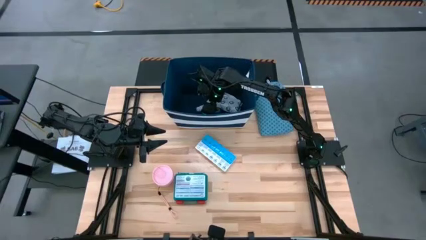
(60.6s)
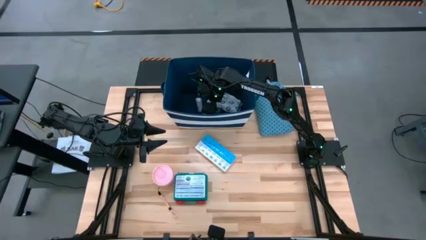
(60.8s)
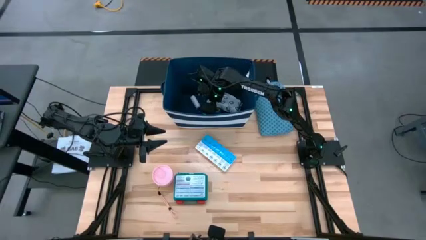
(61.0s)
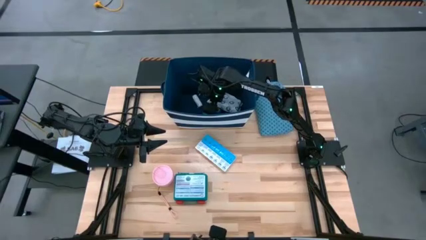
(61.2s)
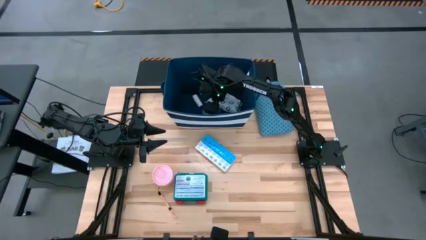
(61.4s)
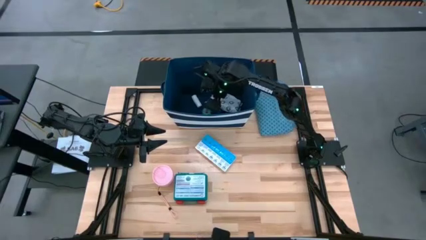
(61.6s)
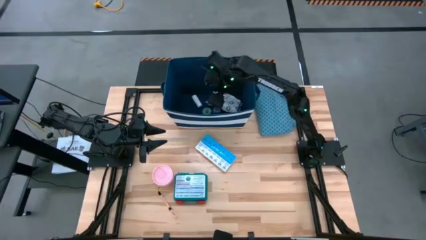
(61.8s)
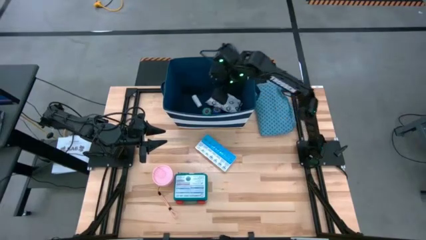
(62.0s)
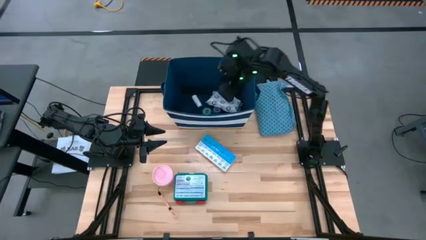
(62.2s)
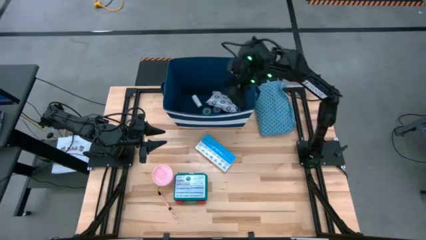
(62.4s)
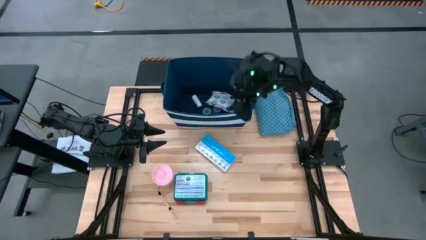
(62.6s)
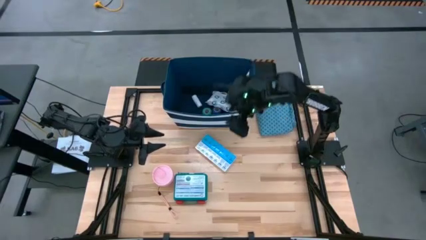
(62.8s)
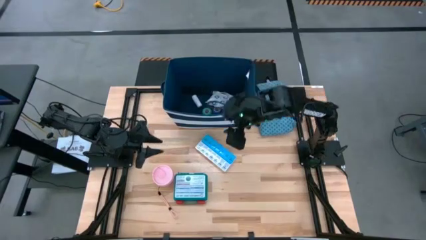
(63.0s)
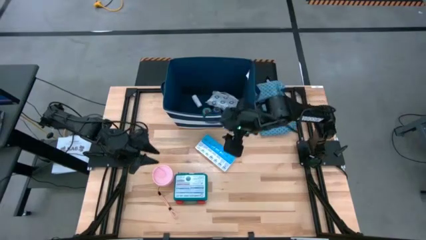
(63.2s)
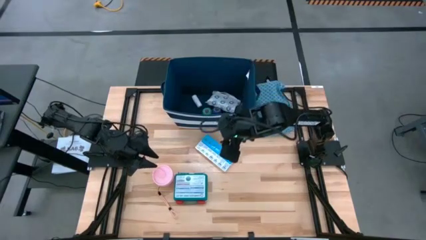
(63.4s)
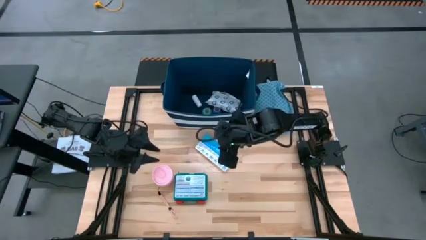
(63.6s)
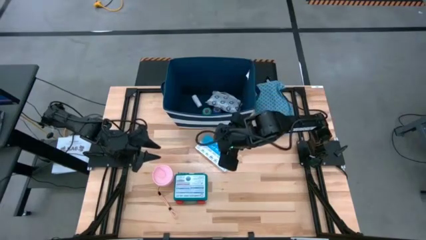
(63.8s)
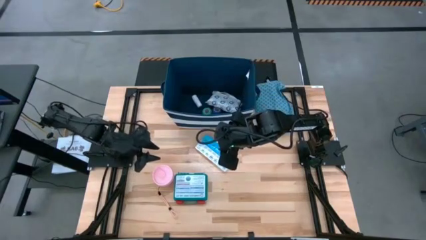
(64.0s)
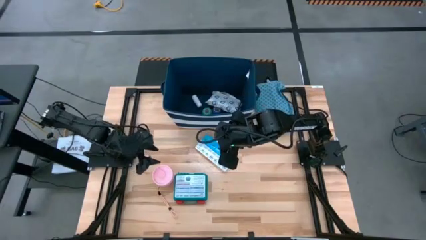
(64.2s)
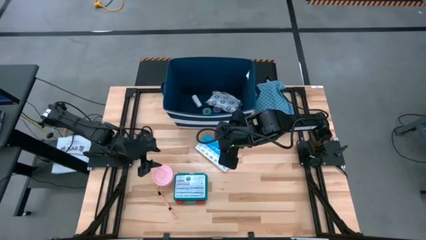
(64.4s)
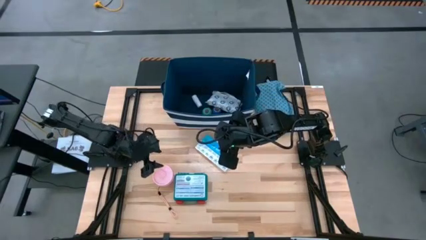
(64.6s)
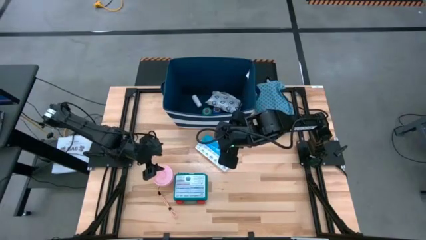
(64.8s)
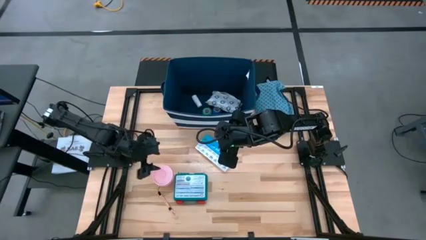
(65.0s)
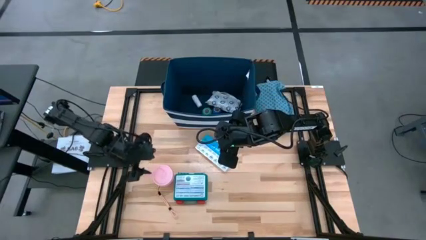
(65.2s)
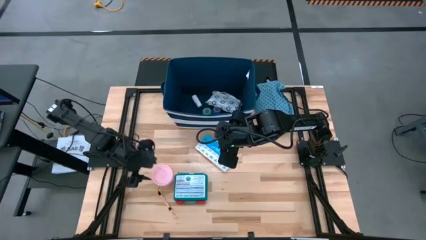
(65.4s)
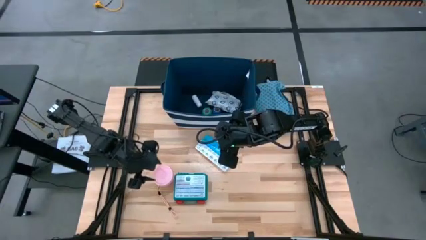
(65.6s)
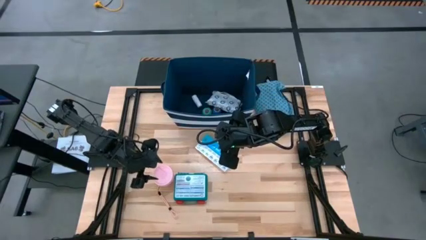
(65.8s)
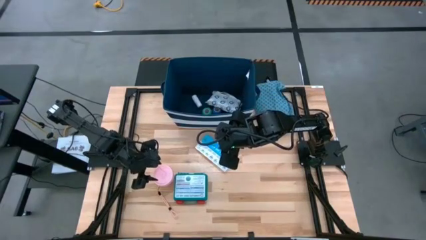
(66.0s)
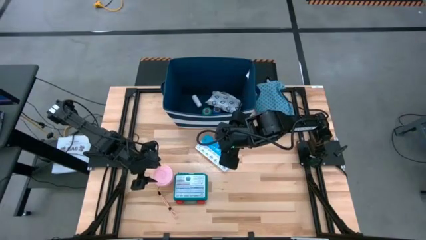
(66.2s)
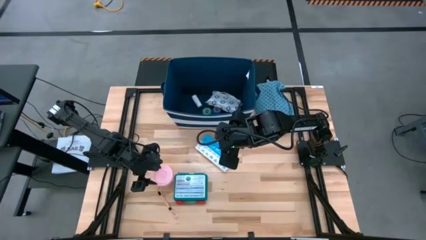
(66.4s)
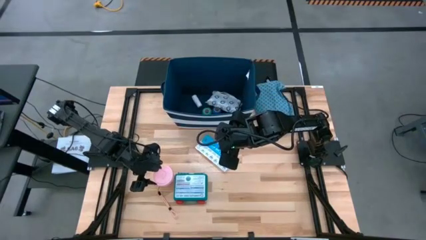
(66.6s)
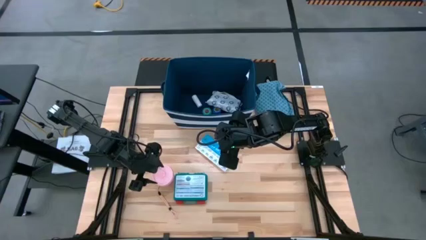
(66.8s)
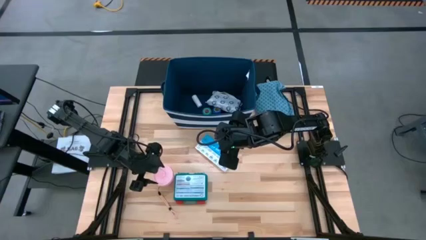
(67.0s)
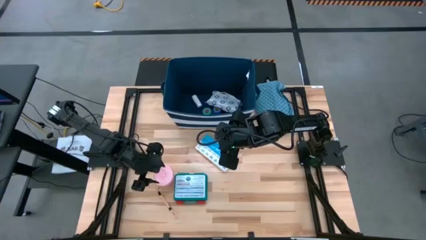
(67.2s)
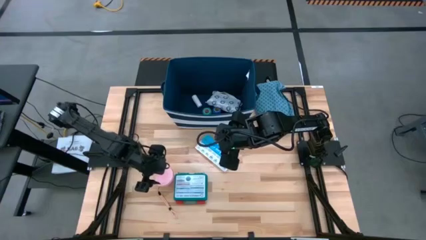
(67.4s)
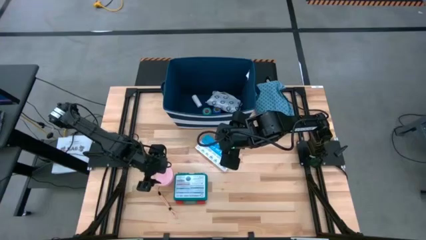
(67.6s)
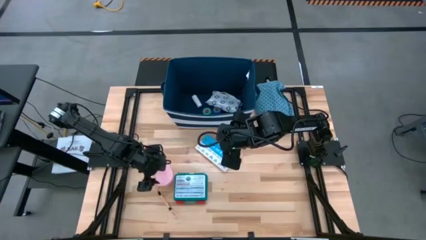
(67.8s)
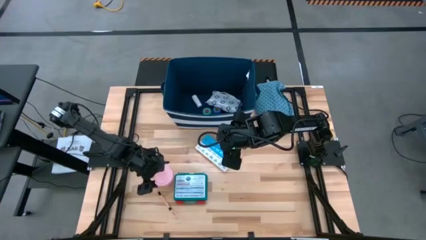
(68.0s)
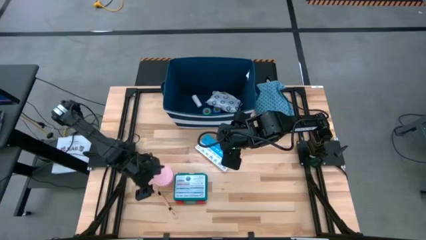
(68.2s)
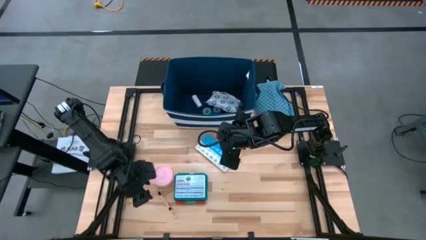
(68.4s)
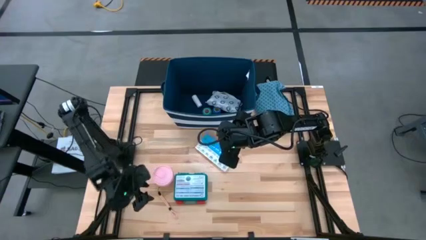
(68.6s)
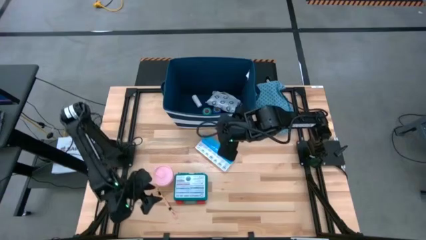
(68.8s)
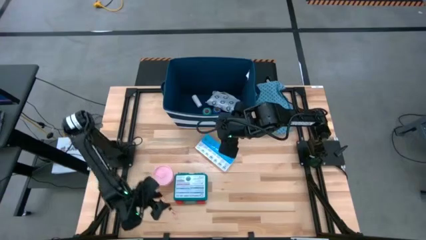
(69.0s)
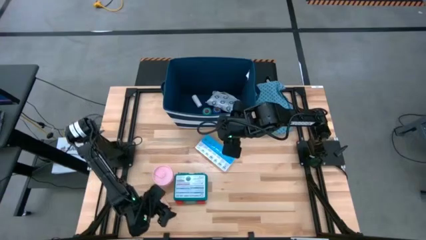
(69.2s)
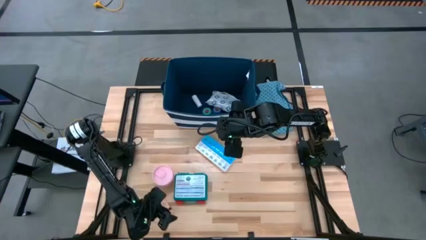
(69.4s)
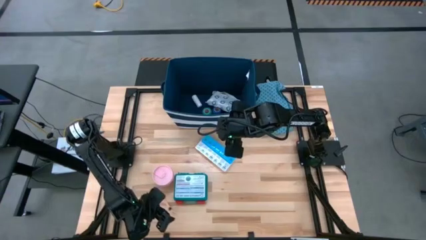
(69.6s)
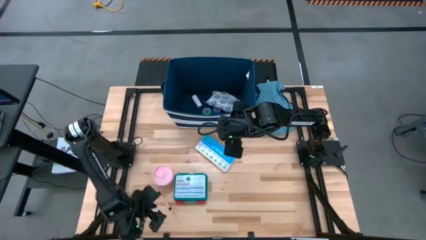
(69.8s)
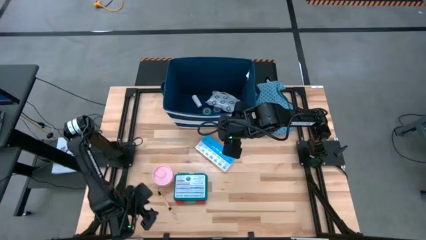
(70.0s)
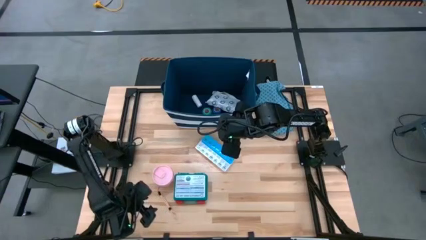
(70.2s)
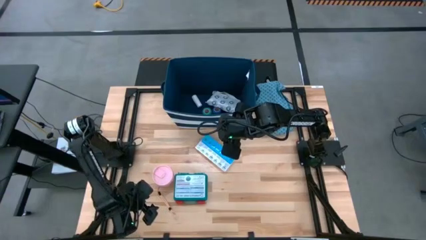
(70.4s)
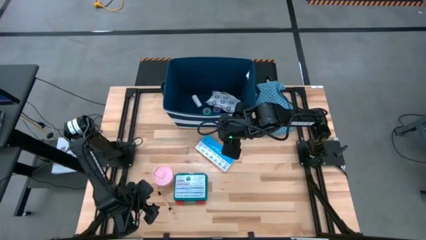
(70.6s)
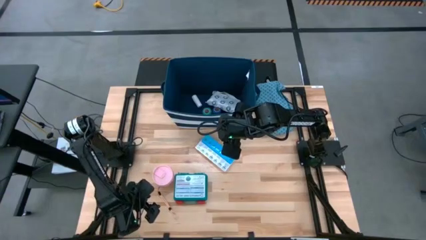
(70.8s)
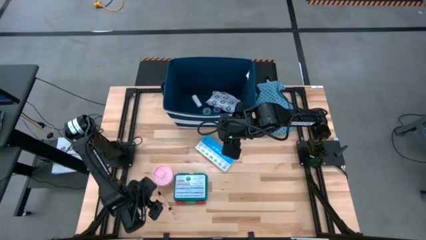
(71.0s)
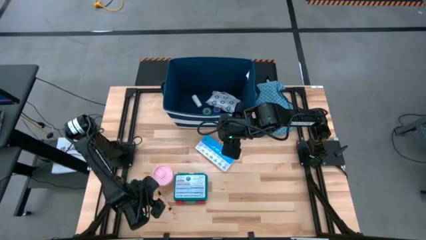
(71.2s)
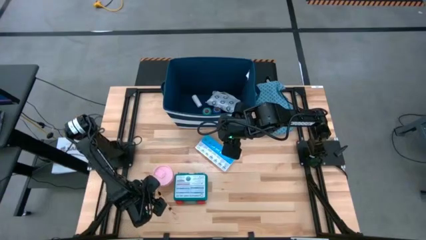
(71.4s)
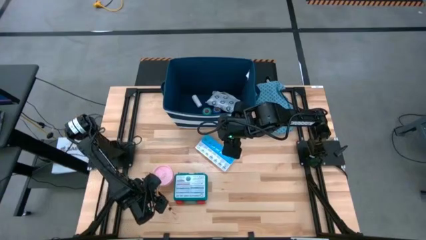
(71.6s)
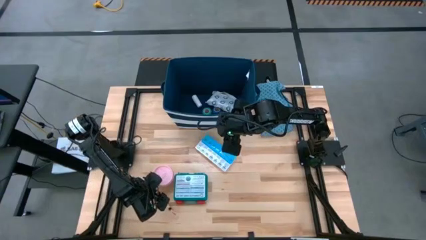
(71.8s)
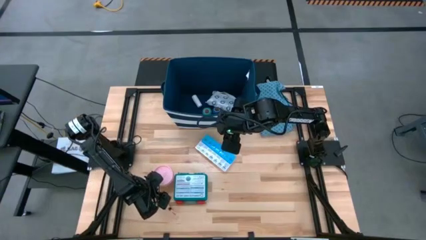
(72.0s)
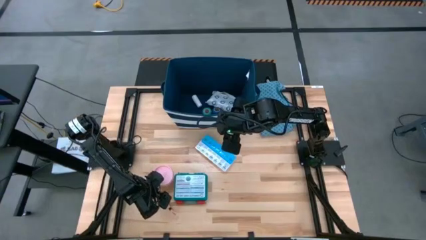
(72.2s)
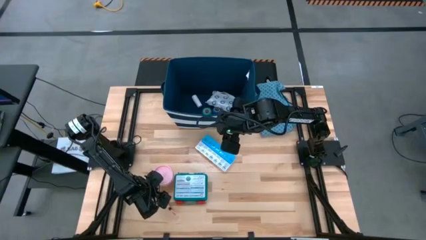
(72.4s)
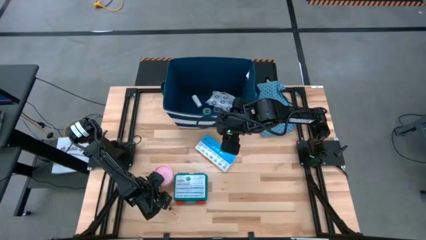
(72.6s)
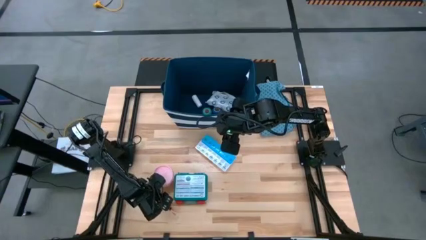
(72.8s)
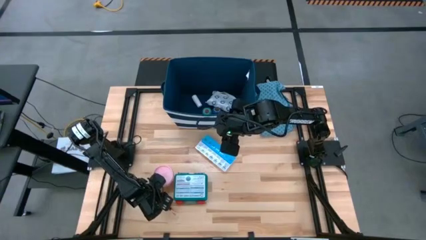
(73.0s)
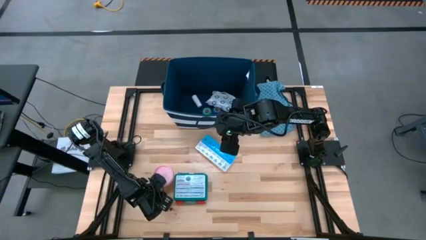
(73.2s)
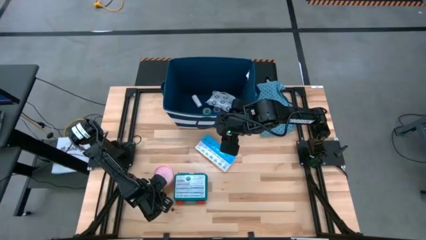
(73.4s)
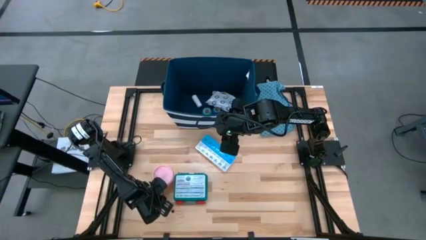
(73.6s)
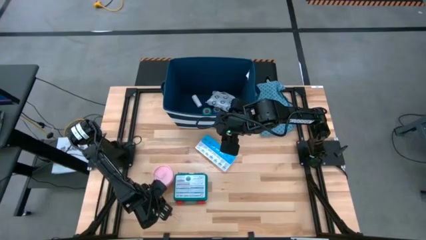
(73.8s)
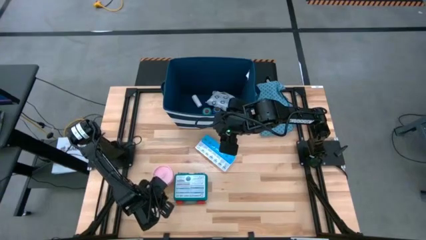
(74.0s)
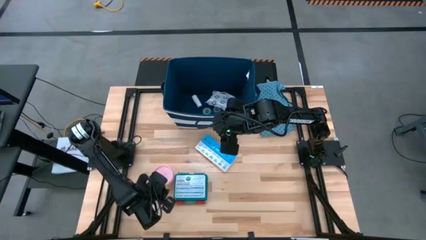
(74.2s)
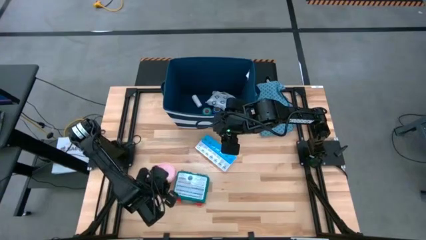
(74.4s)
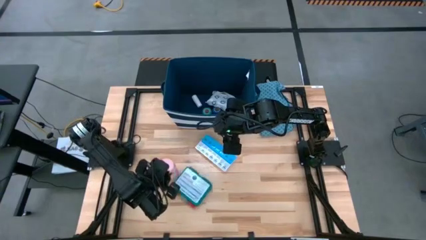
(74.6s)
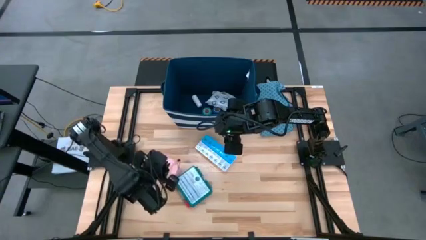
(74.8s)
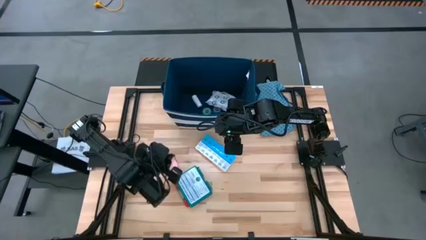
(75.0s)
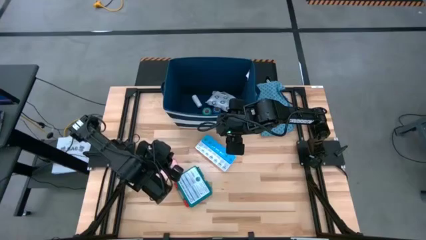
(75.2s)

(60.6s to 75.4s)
Task: Pick & place medical supplies in basket/bin
Put the pink bottle into the bin
